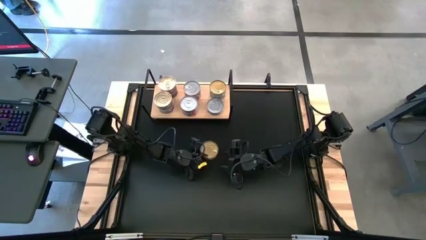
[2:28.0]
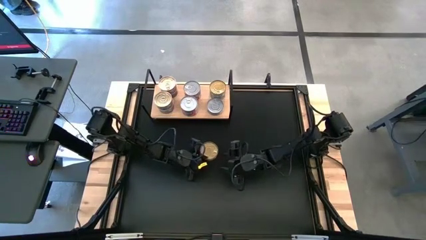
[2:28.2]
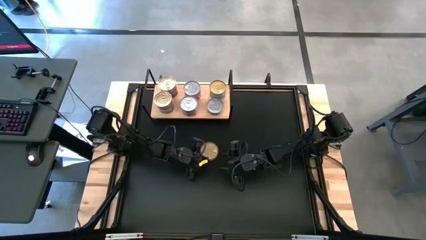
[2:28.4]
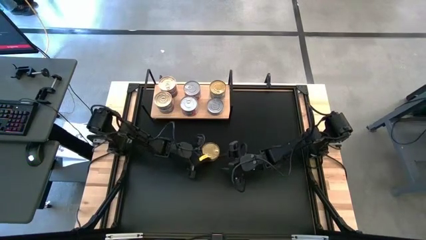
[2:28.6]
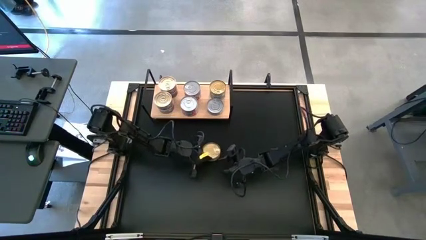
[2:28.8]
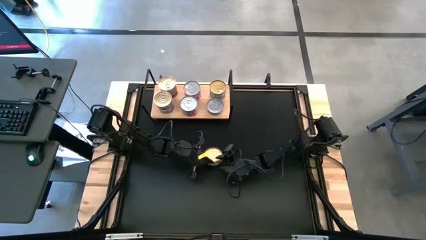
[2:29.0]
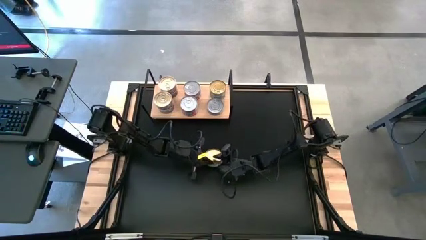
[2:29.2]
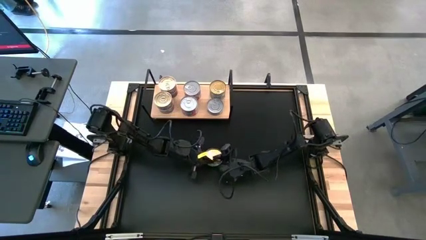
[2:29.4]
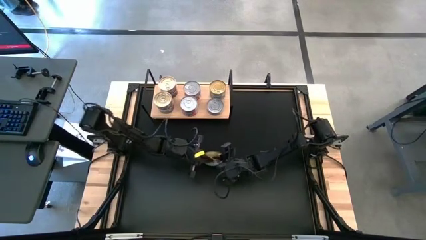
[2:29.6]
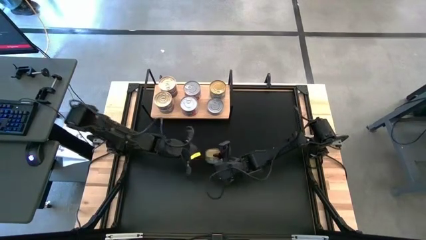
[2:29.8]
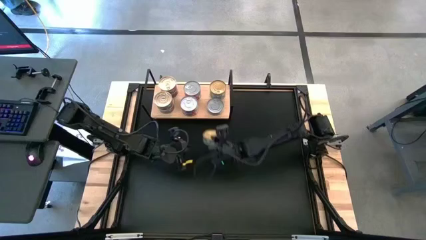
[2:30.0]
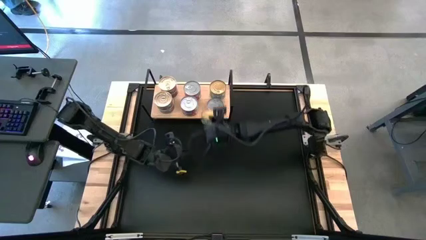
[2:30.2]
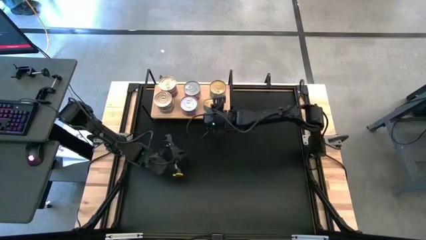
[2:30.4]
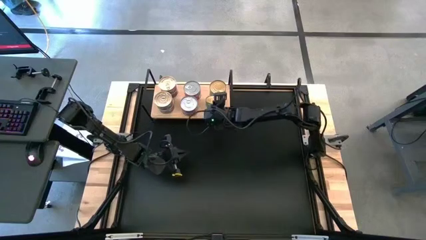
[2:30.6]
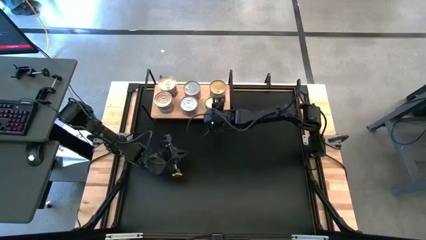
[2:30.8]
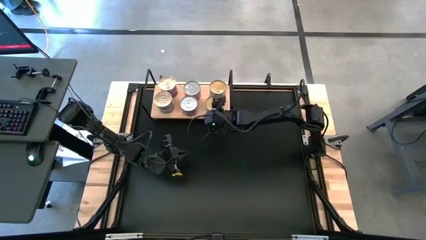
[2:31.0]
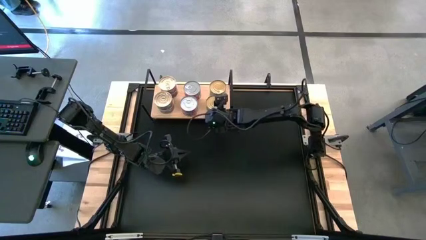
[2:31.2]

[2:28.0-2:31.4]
Task: Stack canned seafood by type on shelf
Stack the green tuna can on top of the green tuna can on the shelf

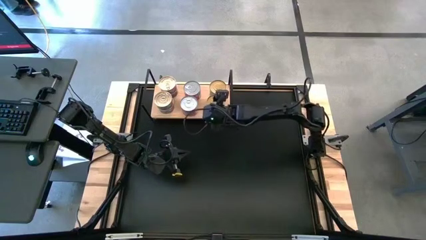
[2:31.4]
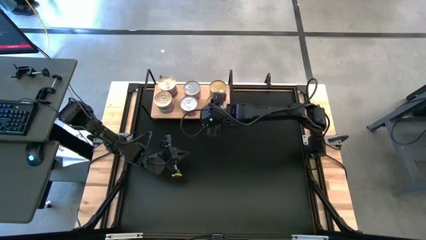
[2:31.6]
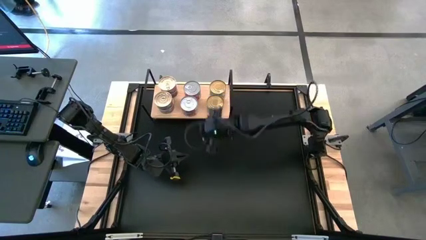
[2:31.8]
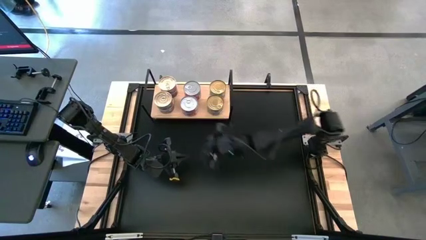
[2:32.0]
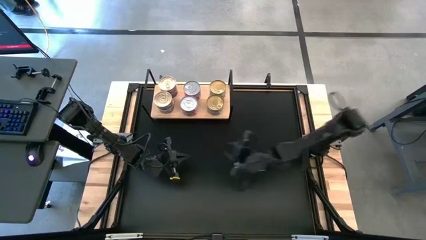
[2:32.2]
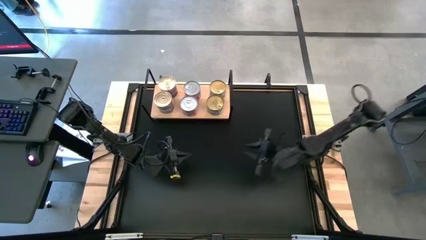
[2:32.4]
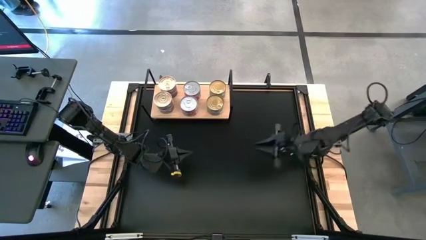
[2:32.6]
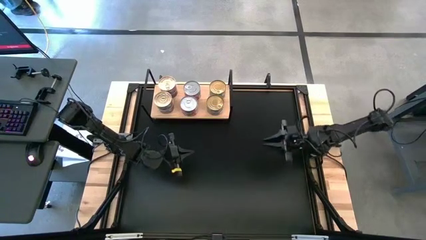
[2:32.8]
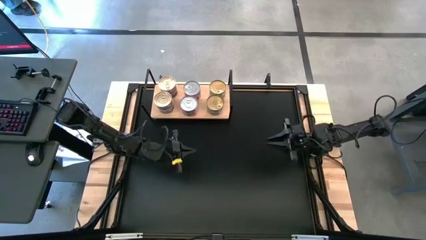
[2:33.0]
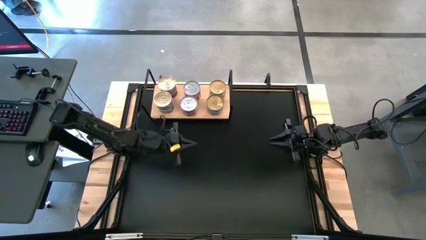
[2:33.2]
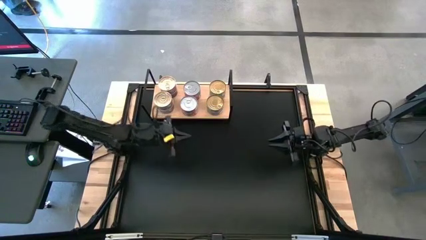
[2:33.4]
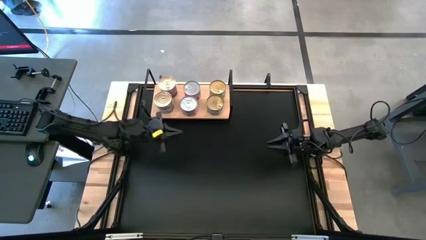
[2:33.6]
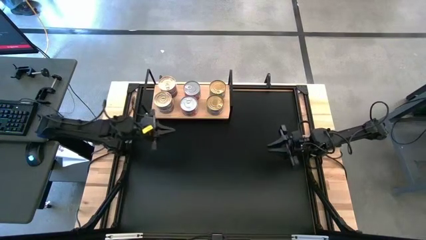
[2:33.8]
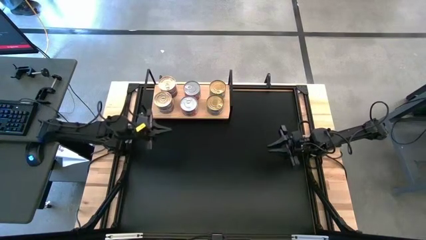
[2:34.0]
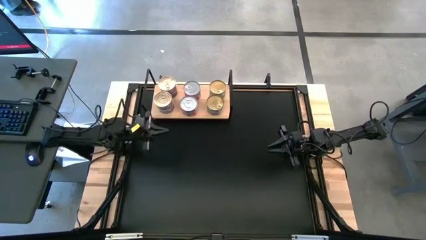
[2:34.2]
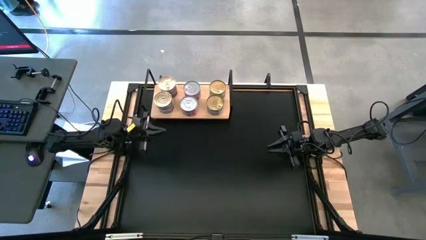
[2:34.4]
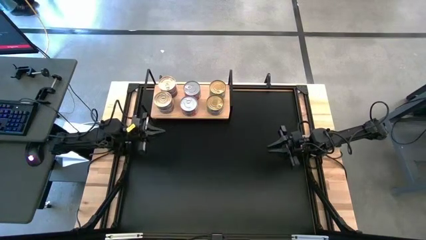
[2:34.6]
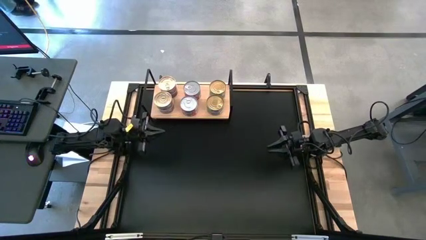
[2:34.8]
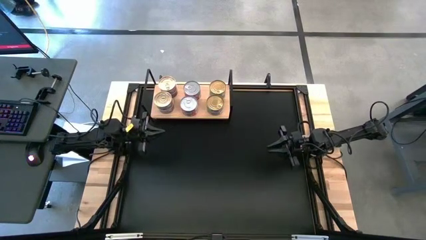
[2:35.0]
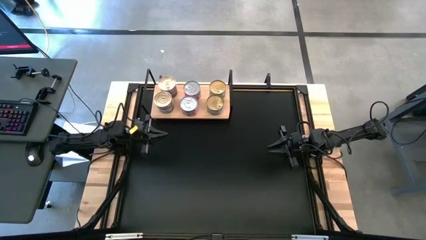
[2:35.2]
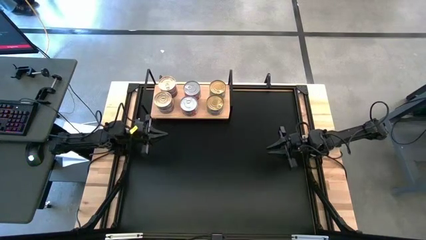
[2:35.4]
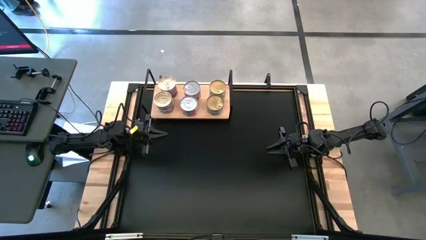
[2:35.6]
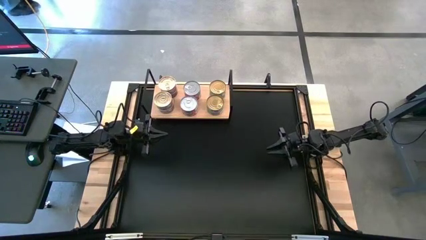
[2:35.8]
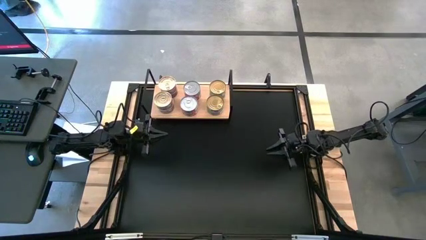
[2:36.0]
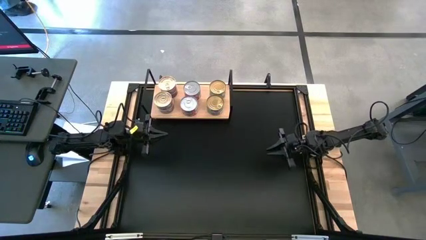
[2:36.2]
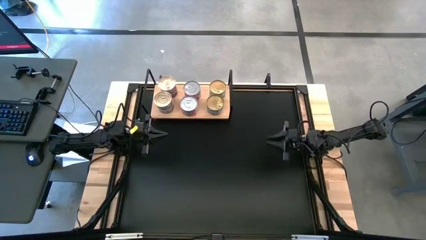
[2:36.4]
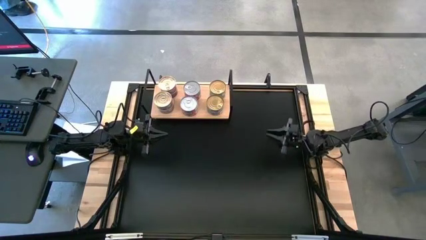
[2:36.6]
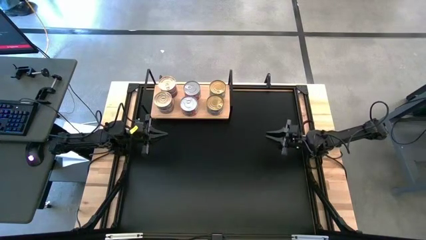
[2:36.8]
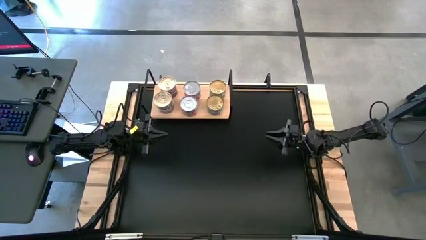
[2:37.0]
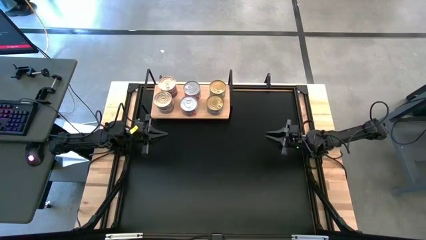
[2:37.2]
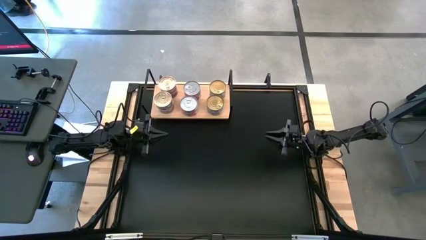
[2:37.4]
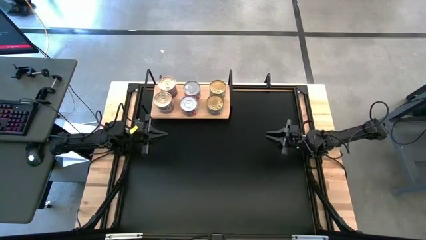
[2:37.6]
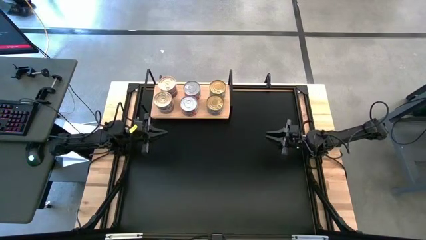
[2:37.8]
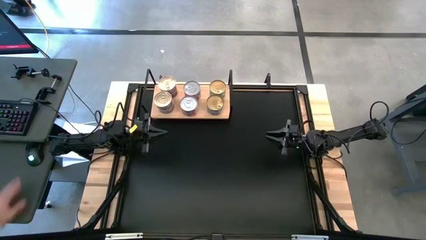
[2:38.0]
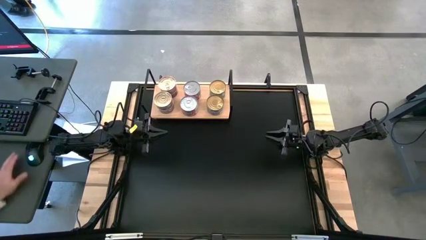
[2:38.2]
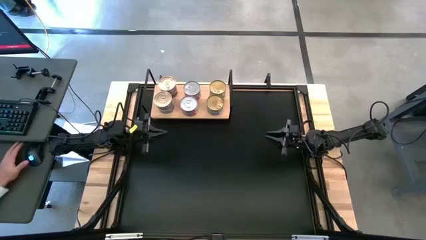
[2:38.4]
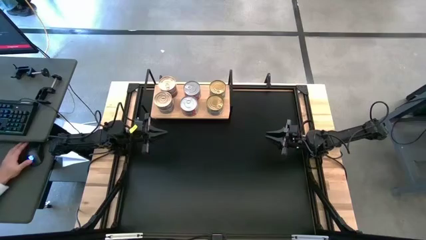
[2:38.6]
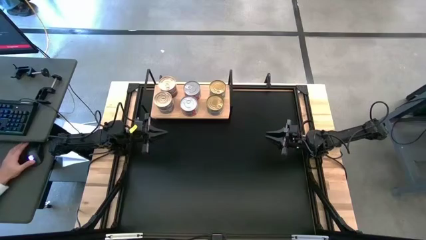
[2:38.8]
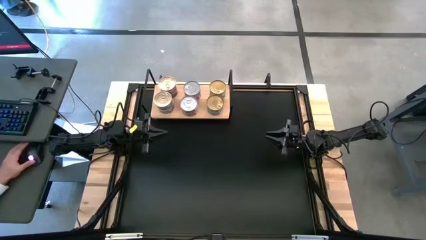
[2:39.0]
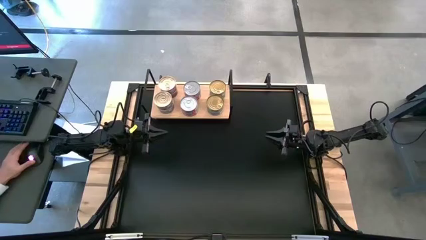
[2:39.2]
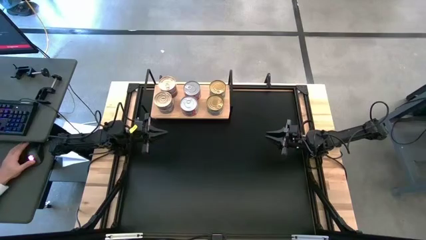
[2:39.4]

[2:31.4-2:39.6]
Return to Home Position

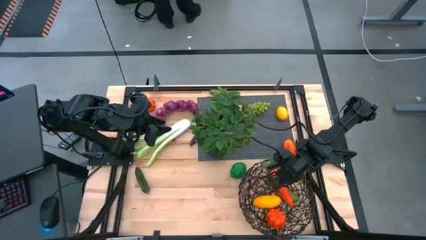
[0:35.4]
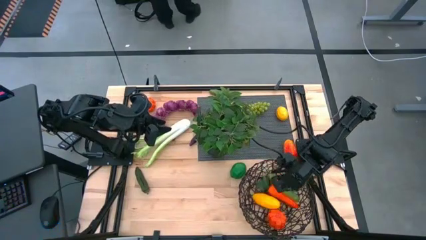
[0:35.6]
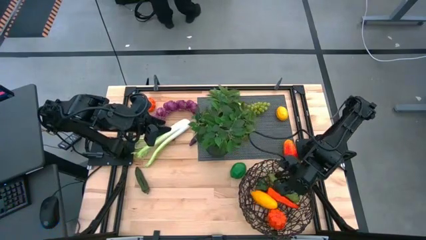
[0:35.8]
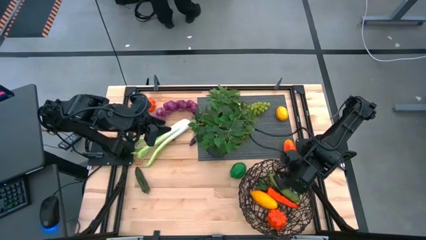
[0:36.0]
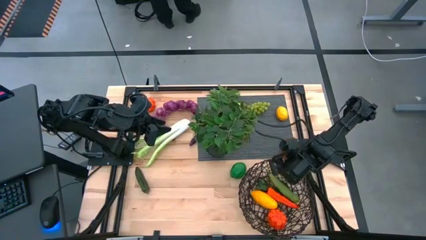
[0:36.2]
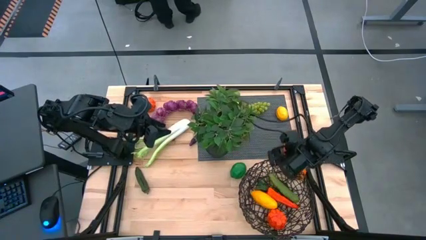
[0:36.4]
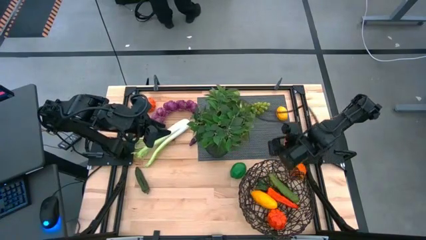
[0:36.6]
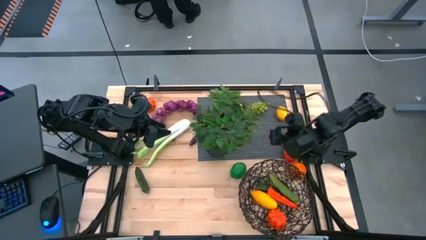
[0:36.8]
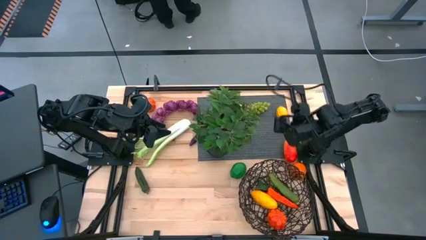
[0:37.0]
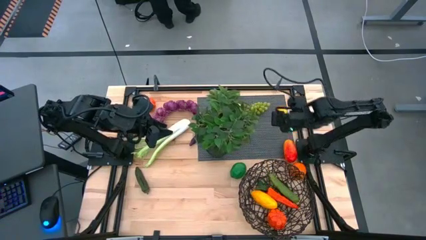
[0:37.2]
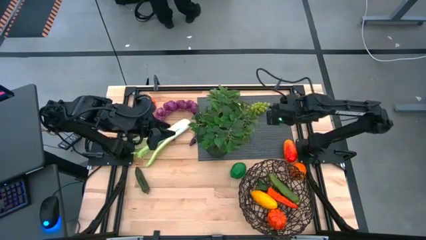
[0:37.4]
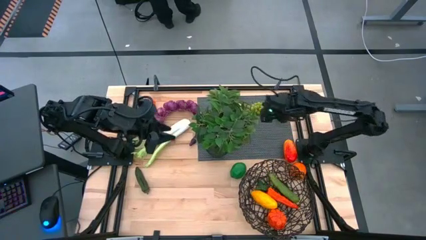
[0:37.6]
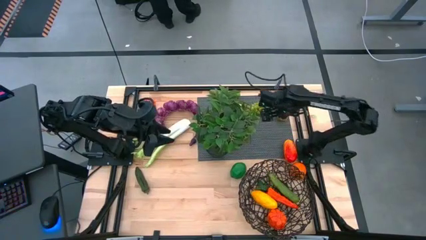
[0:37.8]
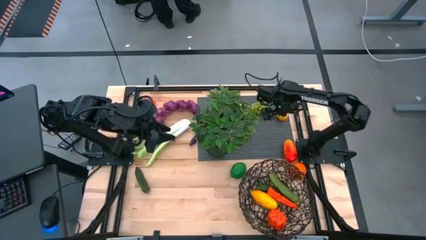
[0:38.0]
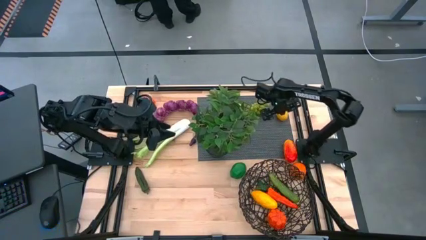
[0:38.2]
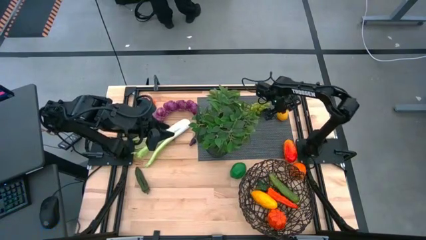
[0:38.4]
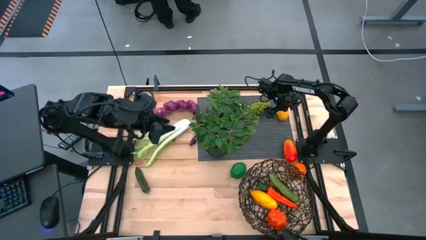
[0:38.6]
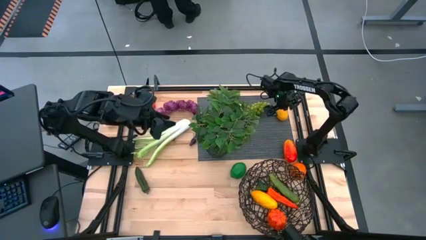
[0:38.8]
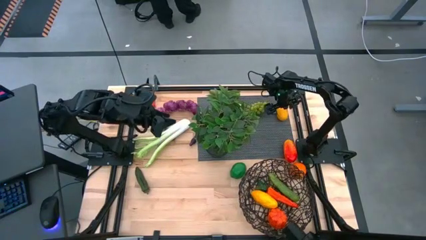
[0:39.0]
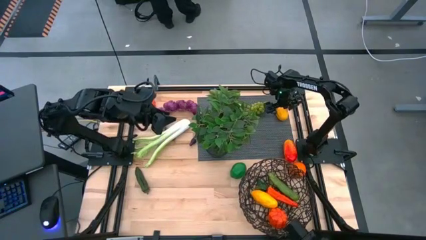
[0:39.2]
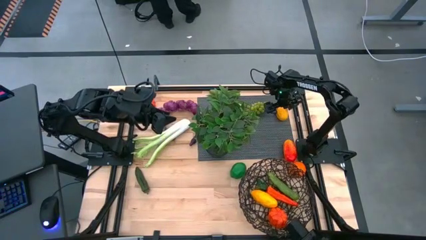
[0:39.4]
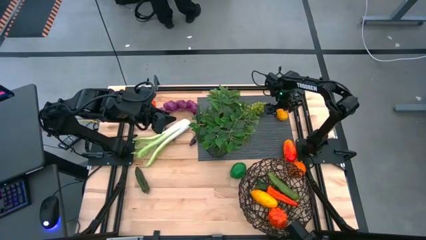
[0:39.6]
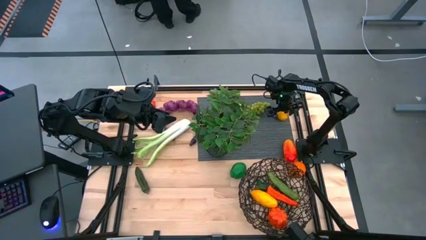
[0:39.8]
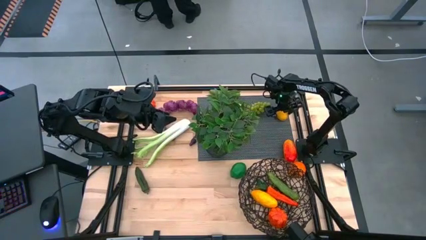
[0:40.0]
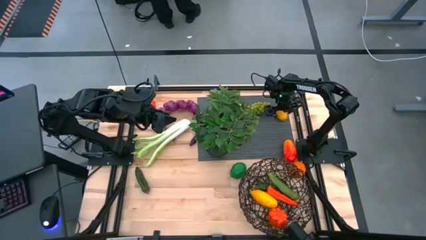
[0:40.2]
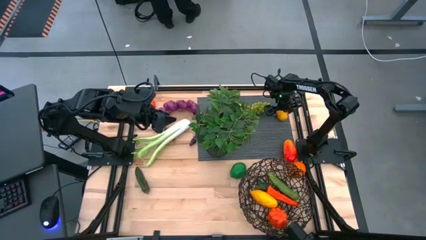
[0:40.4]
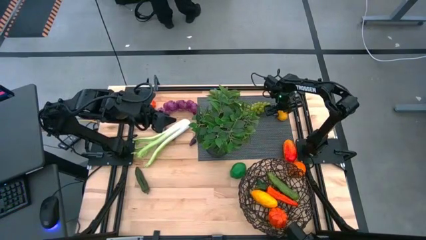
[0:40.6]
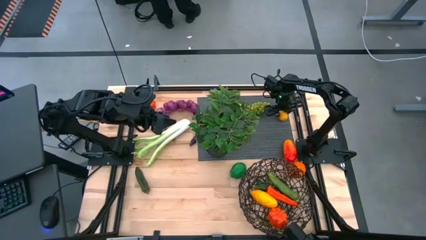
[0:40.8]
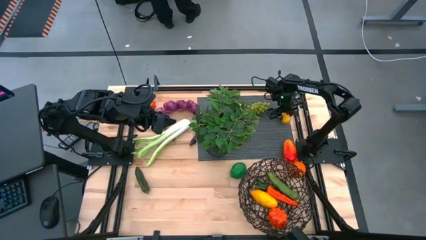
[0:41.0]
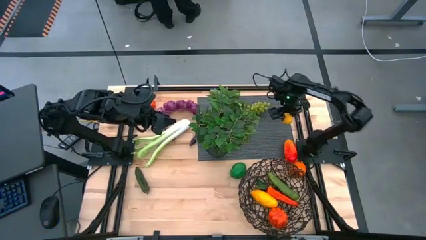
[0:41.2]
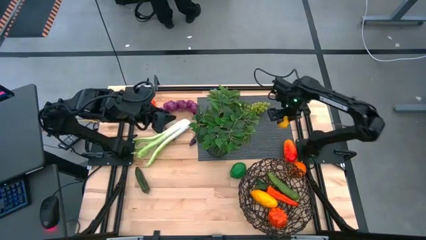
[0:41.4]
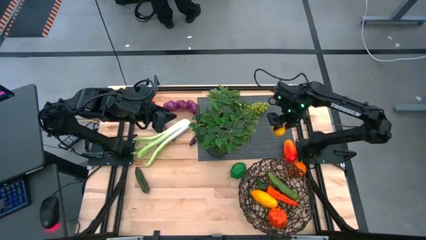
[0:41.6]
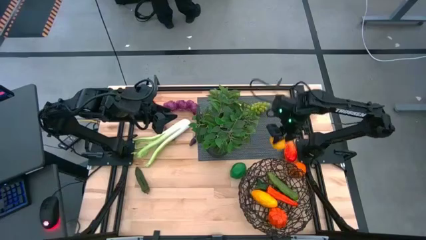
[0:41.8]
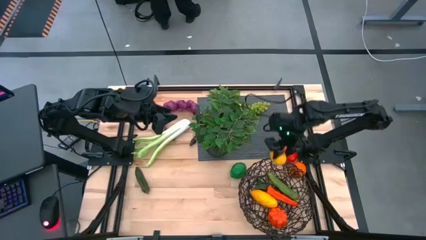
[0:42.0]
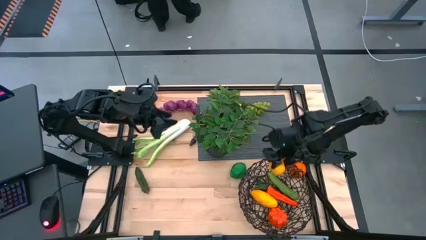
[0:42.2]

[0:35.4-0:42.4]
Task: Build produce basket
Put the right yellow lemon into the brown wire basket
